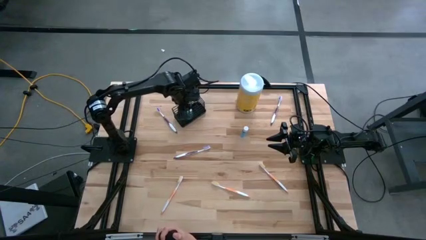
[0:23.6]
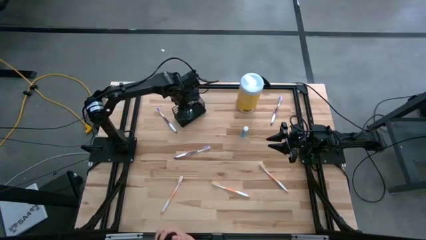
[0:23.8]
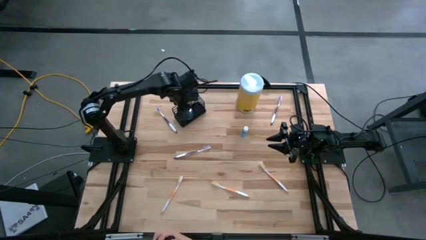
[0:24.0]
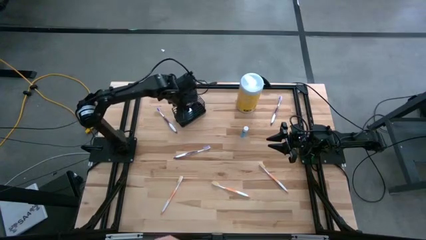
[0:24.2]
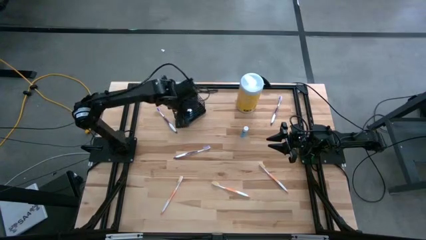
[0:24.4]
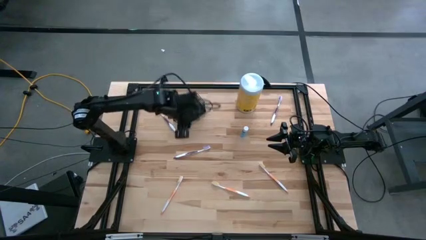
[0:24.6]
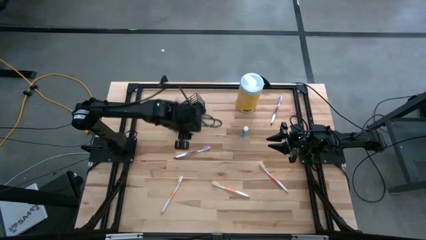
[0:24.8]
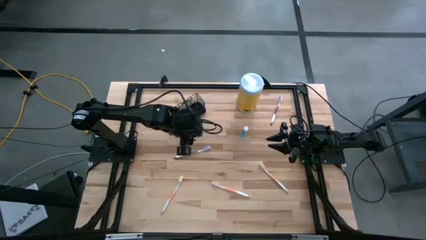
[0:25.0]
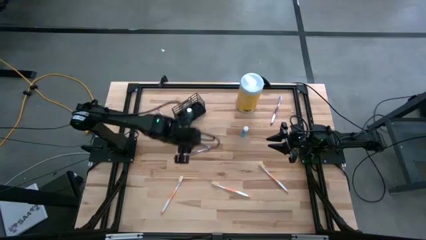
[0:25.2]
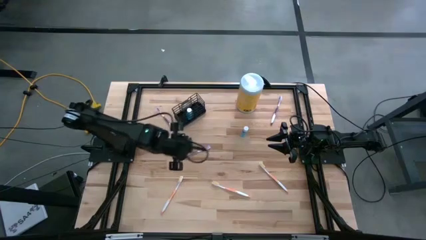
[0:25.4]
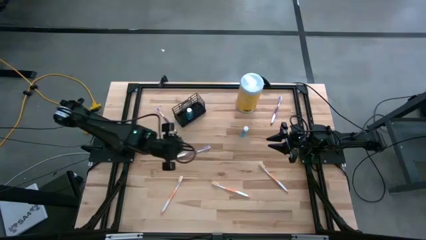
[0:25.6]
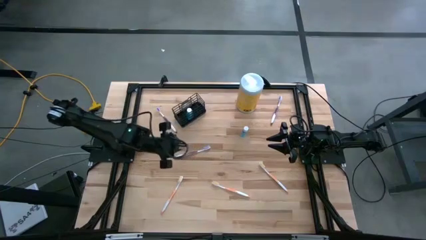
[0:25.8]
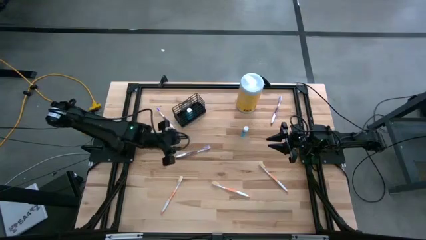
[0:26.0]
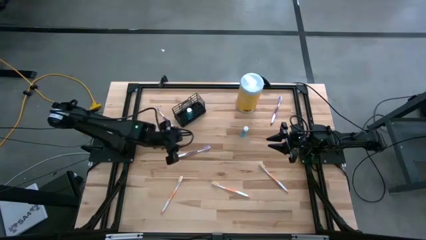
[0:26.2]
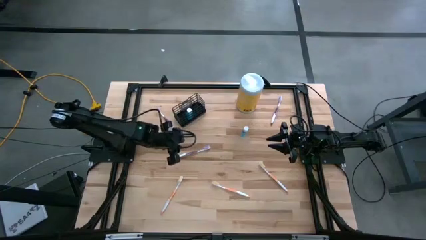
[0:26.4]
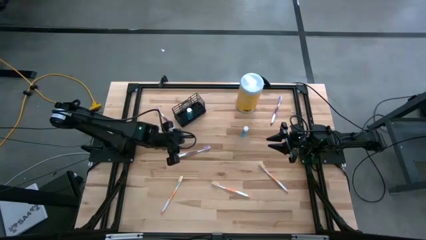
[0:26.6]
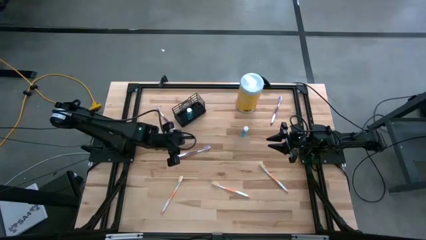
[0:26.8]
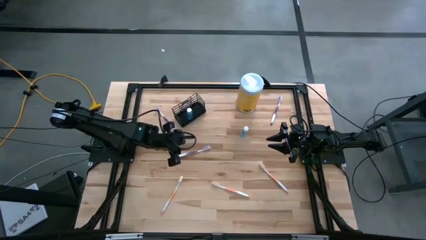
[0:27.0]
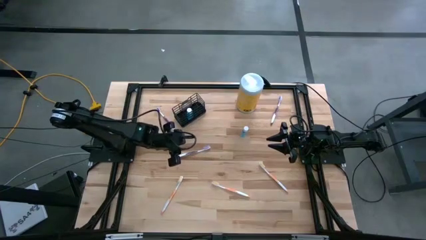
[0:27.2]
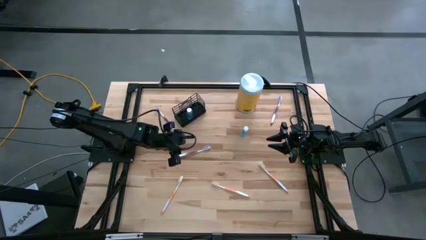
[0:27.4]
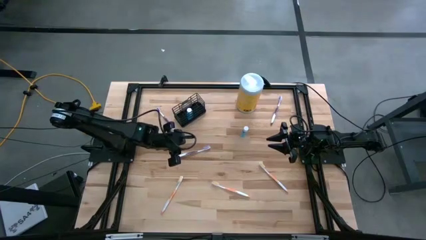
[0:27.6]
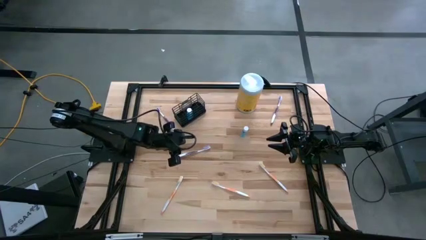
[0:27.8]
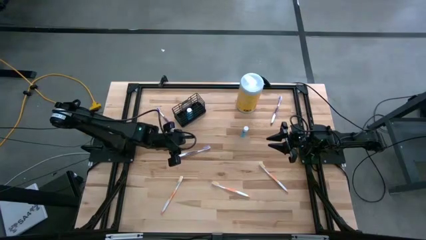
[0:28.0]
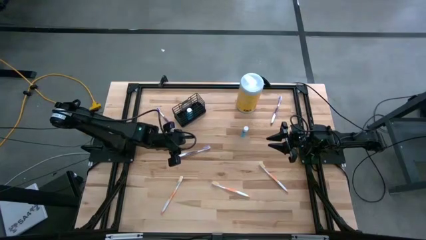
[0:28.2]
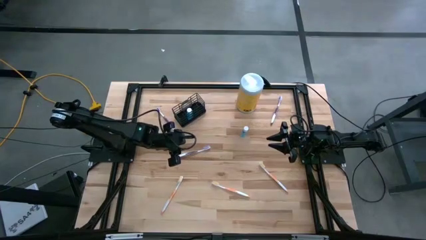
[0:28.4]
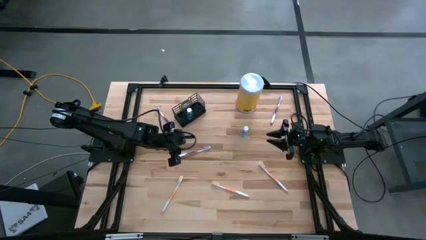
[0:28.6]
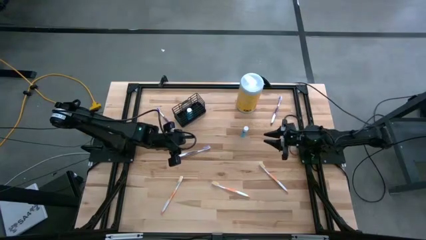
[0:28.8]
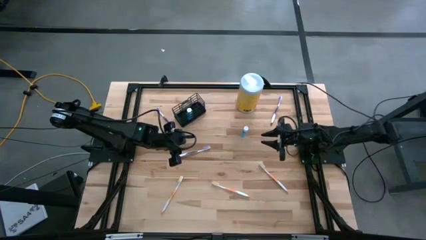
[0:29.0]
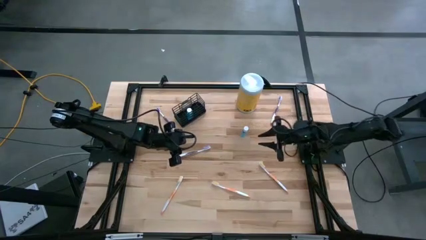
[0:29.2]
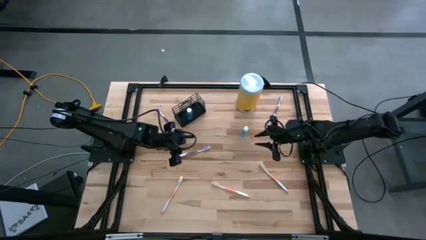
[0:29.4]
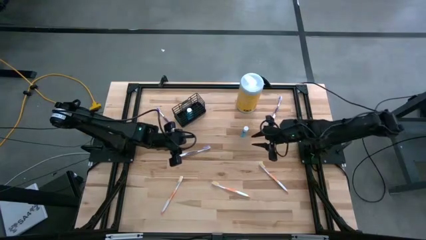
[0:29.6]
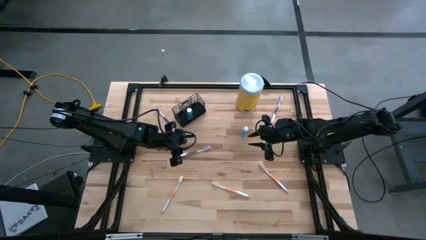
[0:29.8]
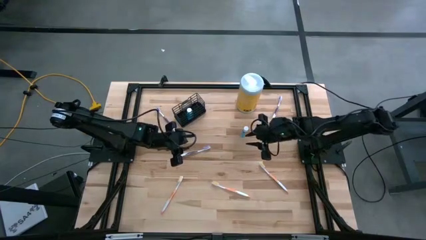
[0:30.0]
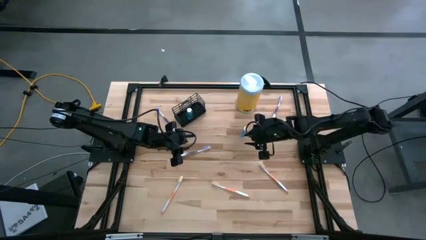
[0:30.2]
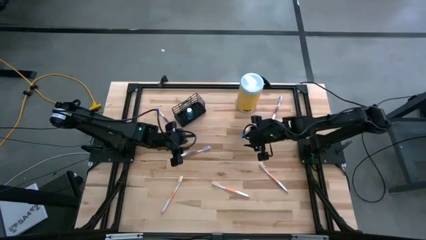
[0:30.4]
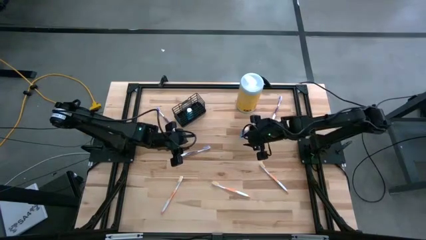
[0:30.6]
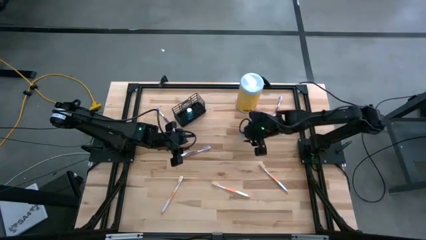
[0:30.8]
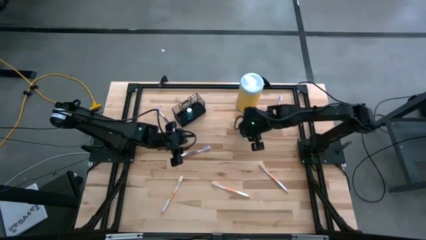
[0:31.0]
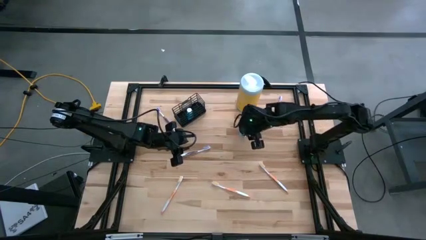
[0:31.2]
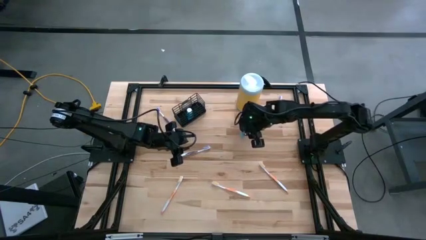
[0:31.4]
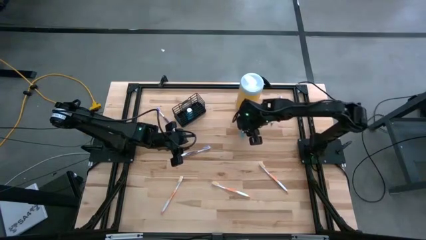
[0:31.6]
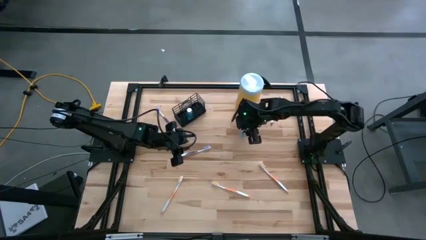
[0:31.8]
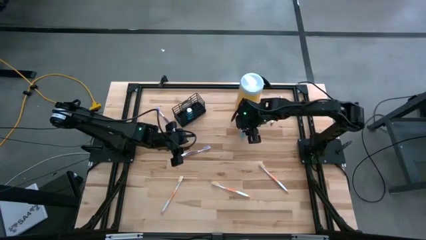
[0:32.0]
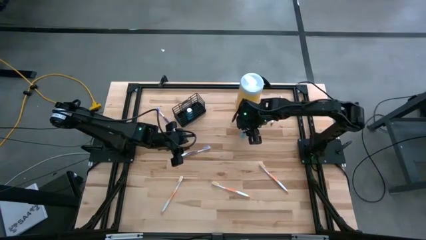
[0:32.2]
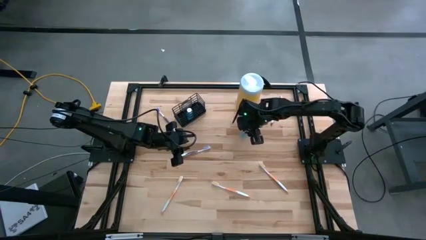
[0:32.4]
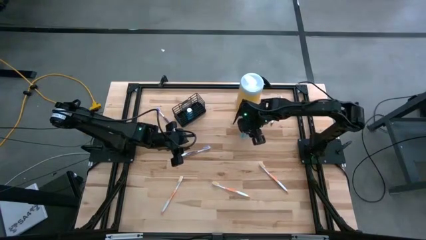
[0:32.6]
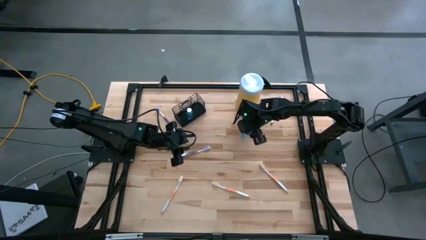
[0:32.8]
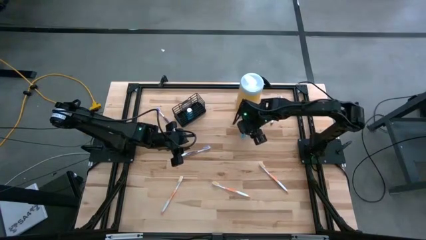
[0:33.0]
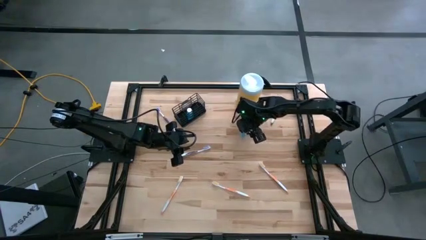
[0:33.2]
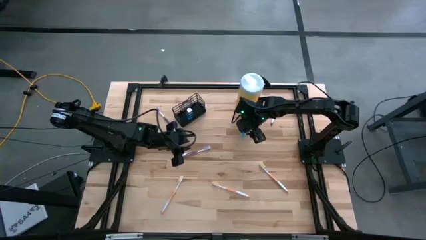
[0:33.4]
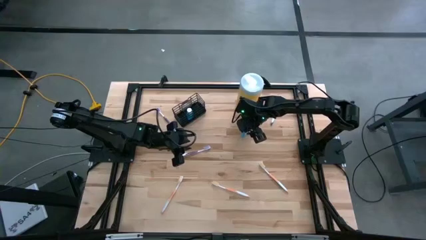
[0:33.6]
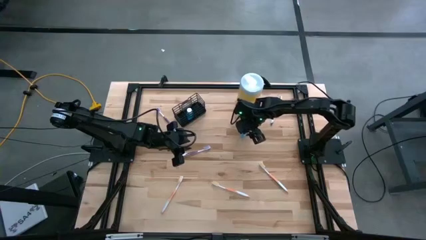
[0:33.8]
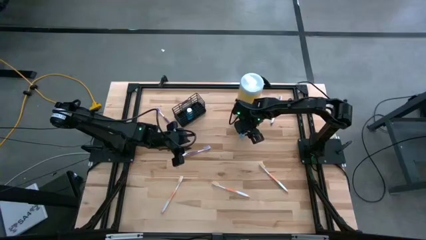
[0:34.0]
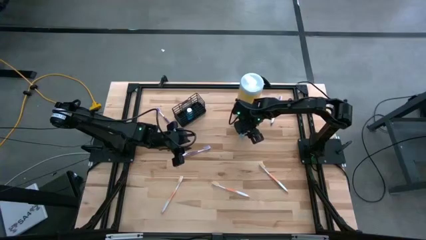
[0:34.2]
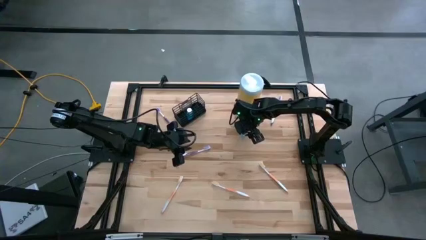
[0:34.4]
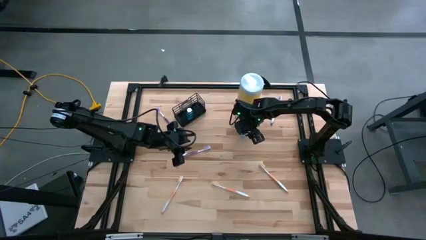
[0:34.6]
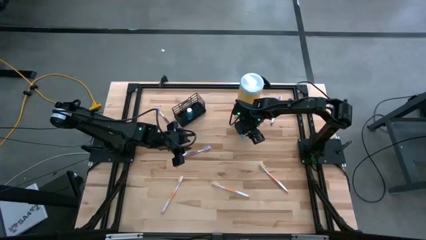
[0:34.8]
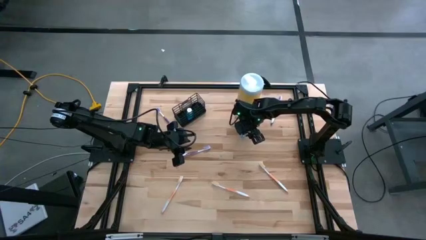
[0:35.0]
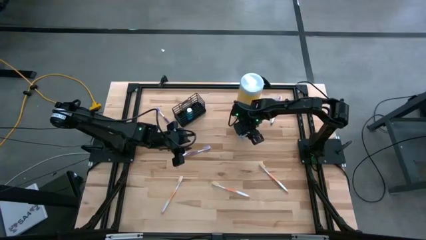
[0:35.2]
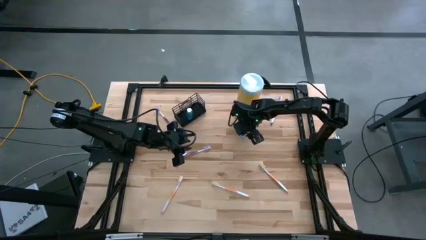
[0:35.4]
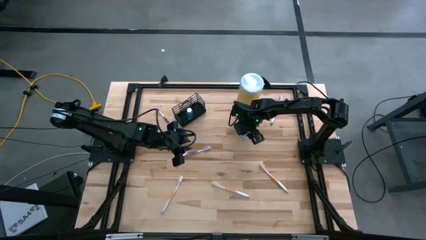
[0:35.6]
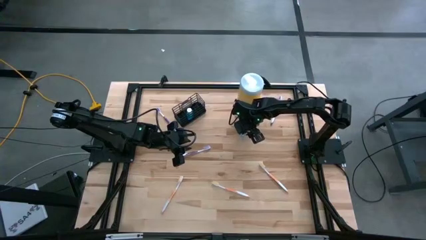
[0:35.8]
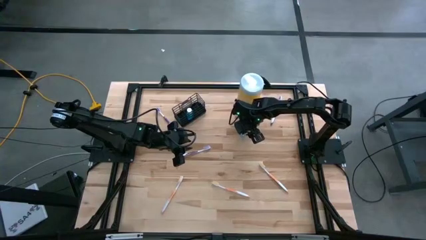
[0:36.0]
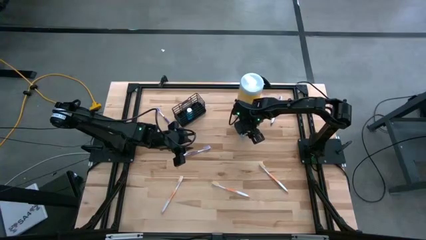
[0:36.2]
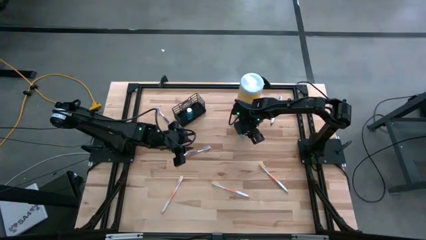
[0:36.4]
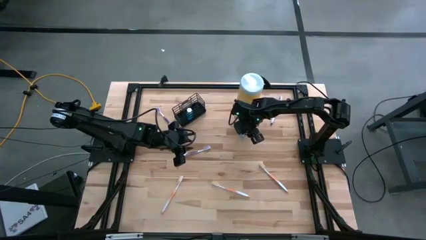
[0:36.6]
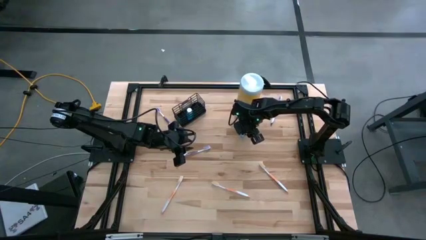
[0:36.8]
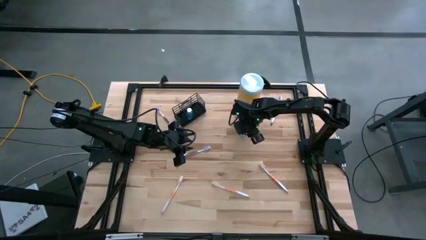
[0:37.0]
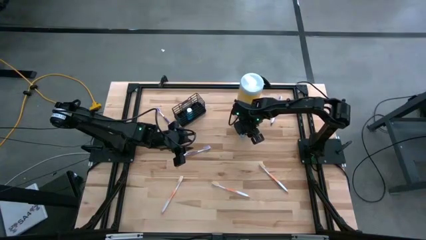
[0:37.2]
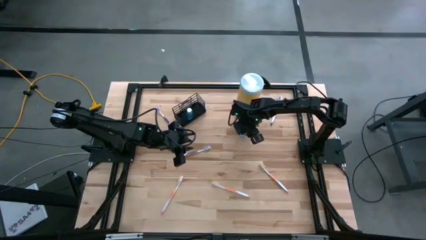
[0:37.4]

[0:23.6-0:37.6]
Task: Pick & Place toothbrushing station
Put the mouthwash into the middle section of the wire organizer
